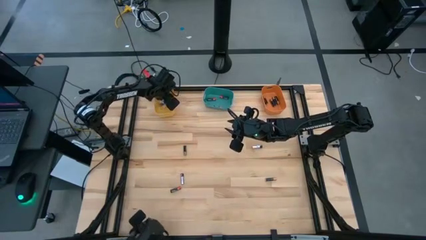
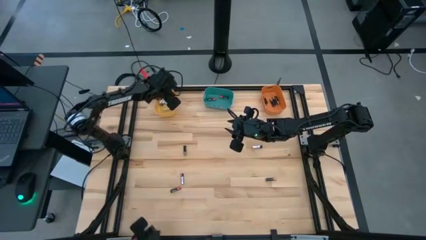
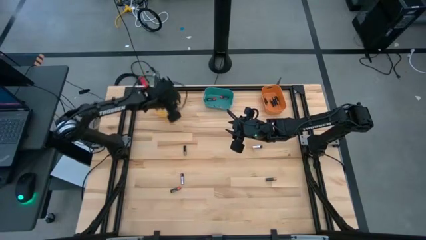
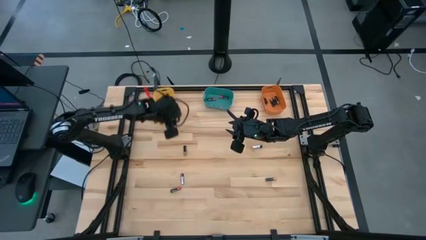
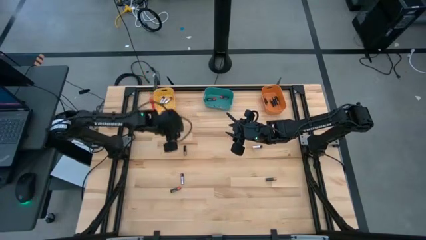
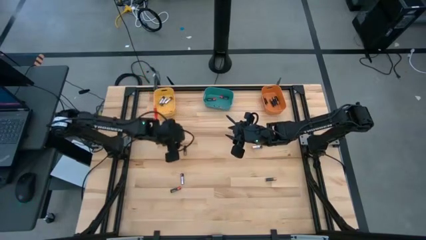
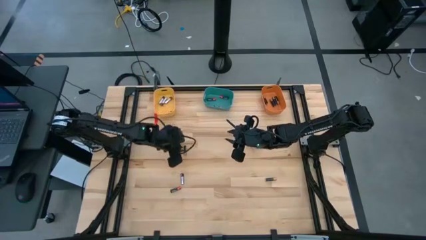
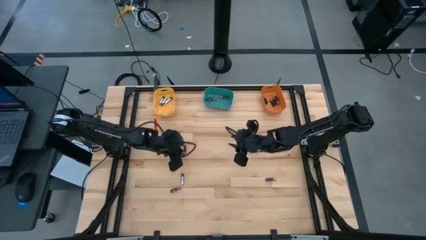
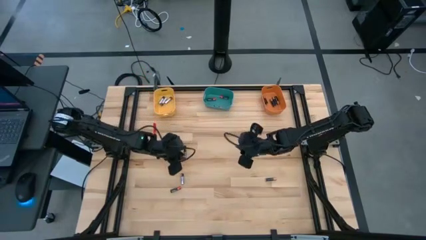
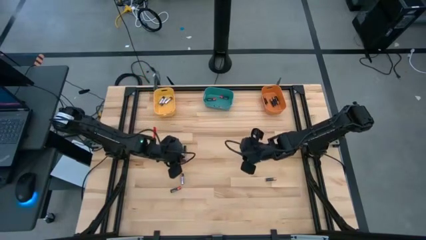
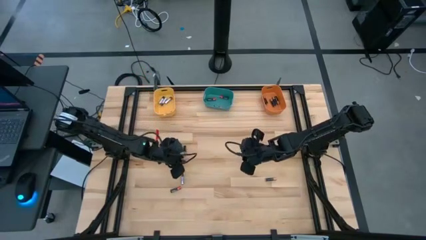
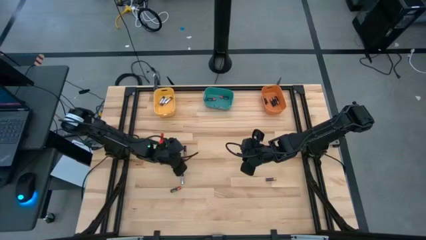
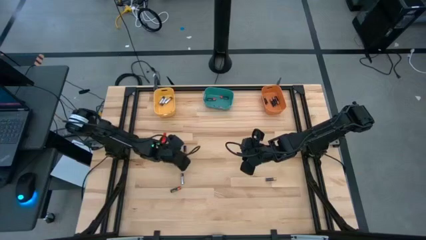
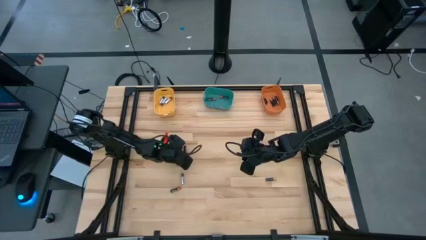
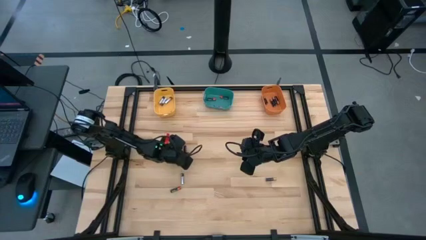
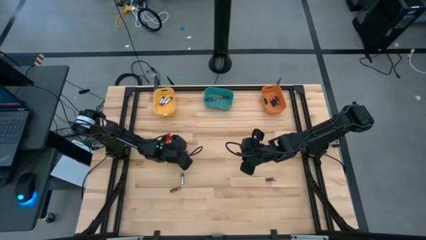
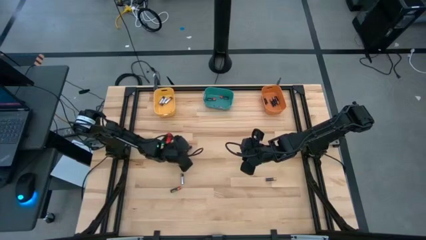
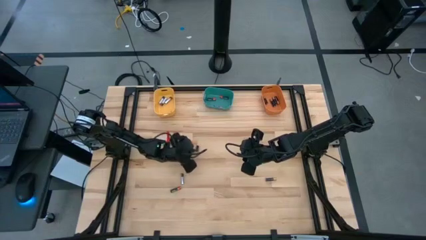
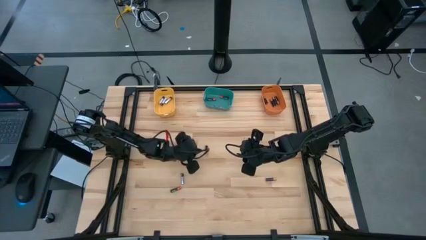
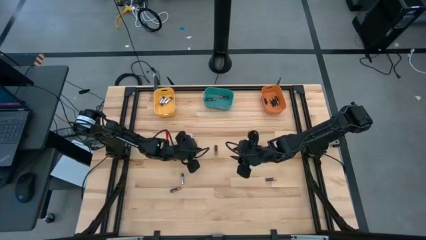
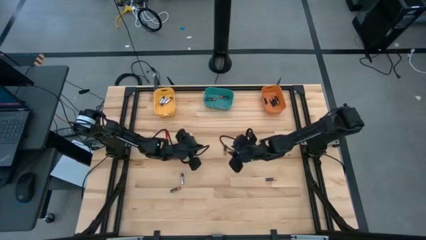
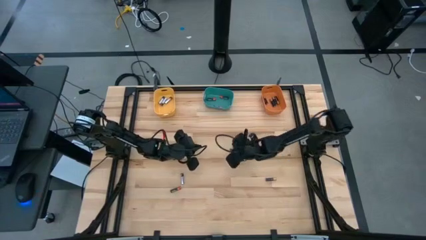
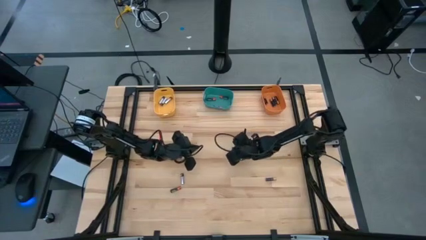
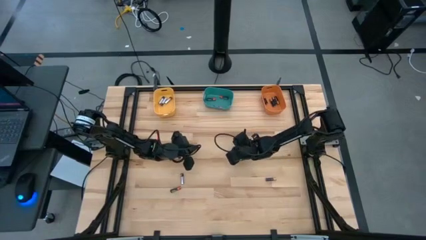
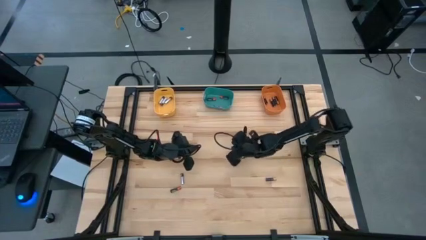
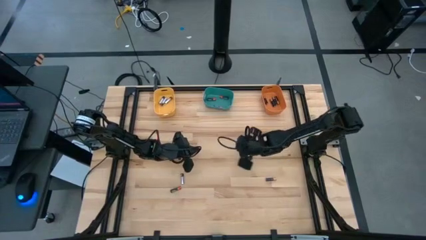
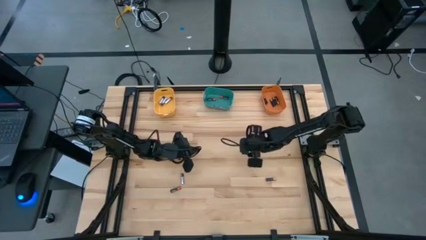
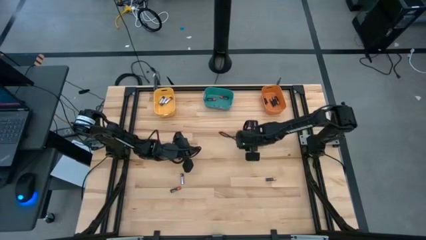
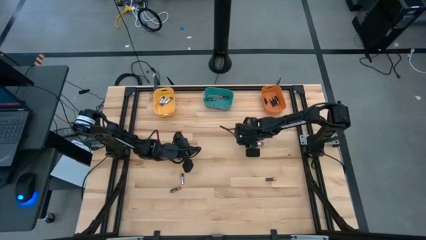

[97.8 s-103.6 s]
Task: Sort batteries
Put the brown battery into the orange bin

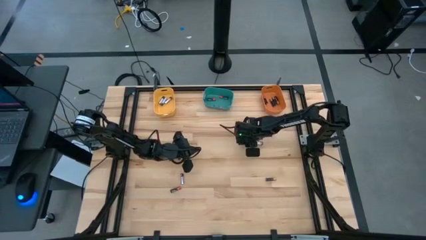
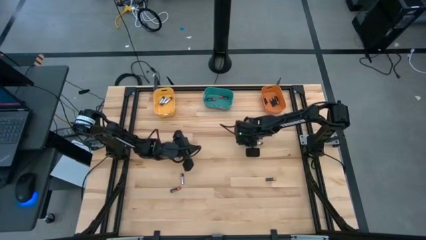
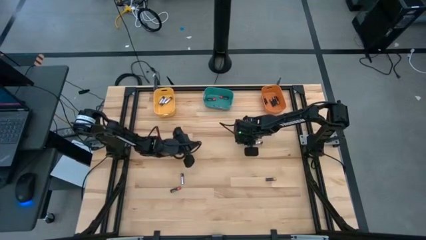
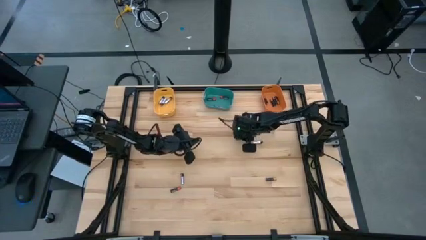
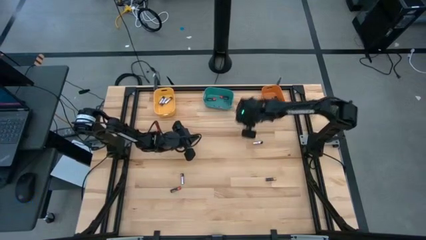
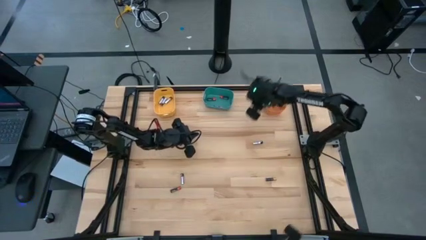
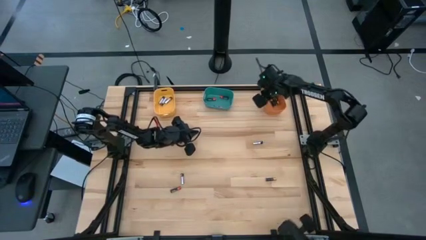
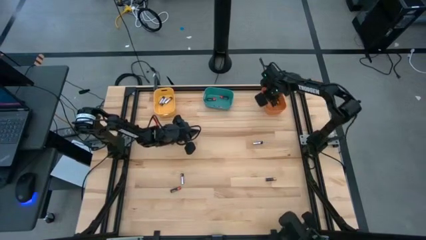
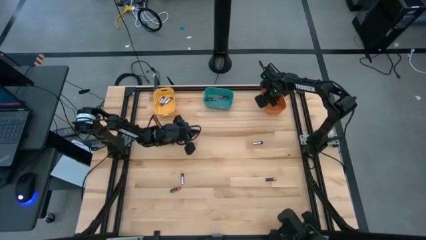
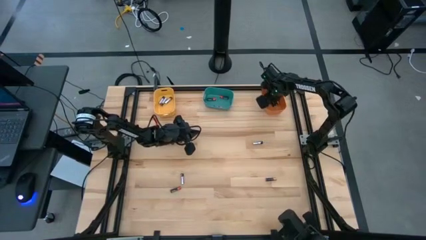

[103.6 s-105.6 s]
Put the brown battery into the orange bin

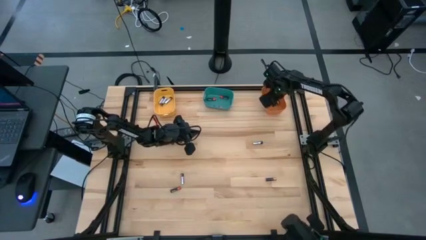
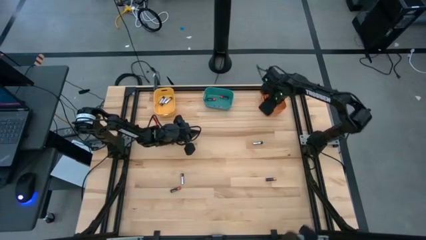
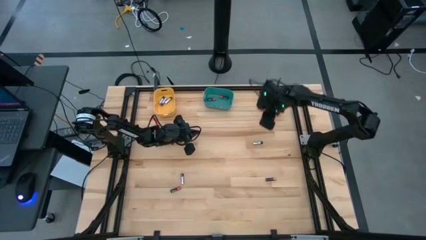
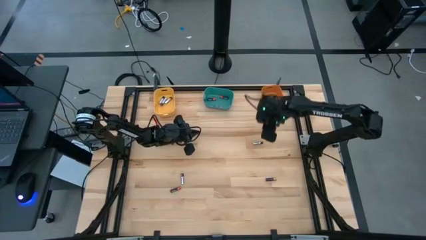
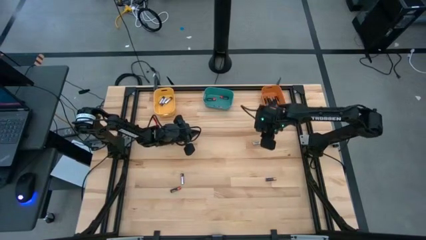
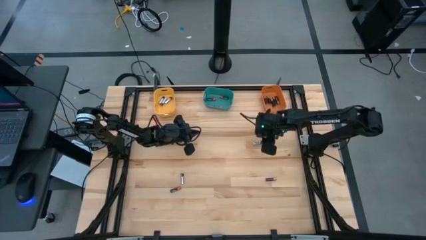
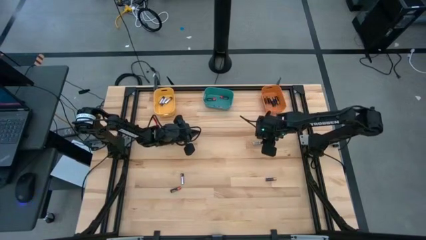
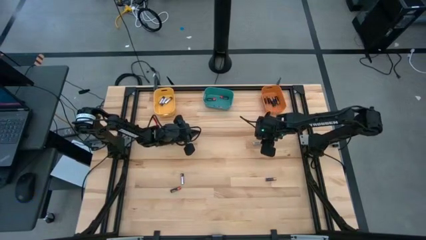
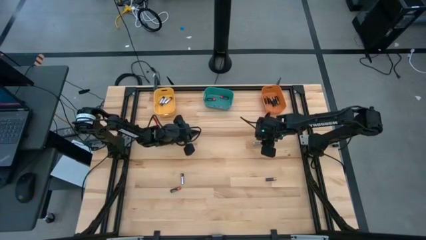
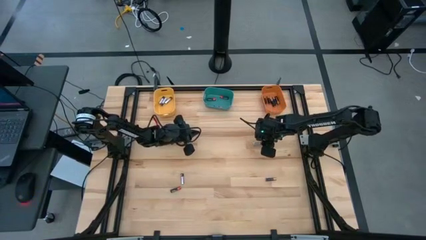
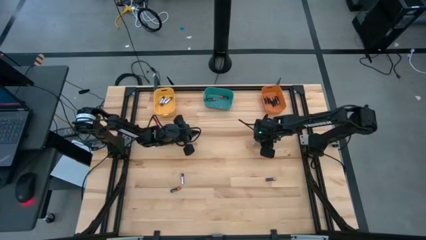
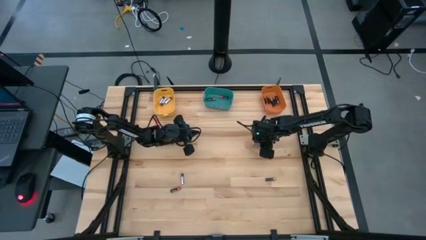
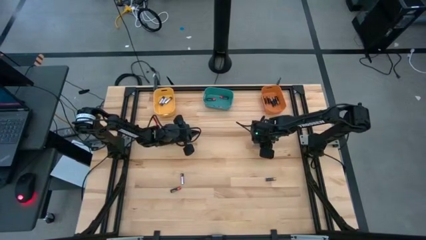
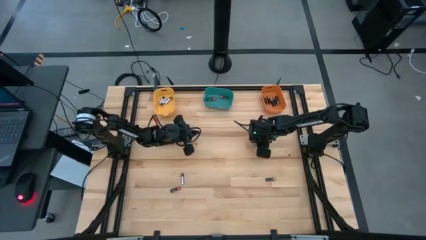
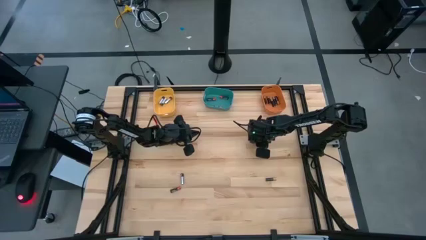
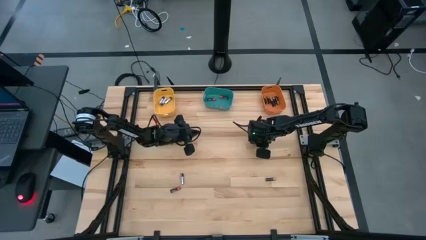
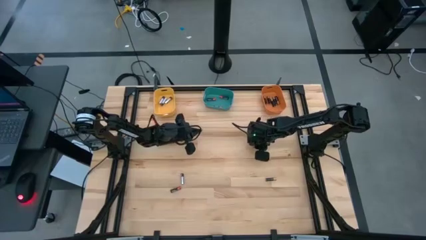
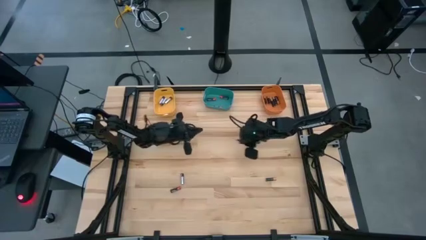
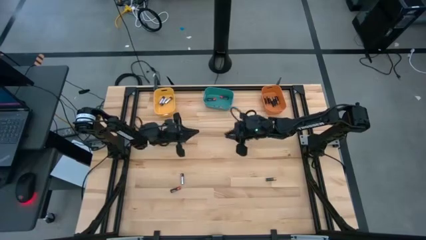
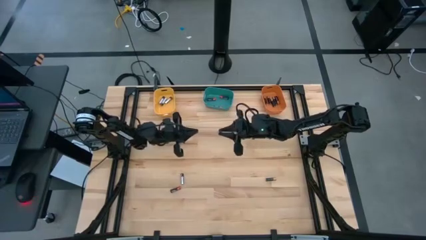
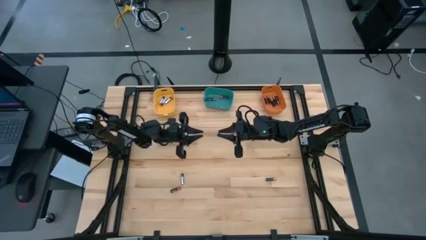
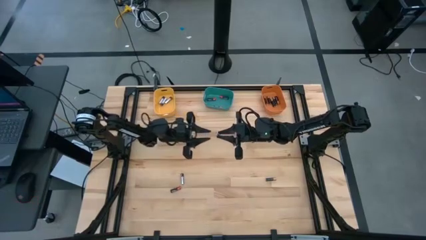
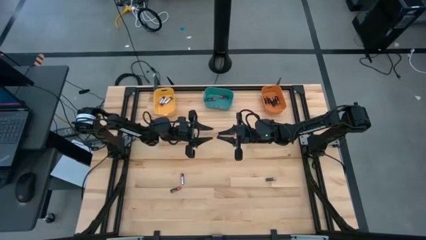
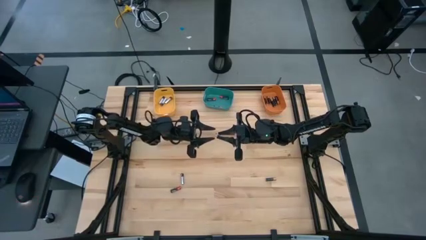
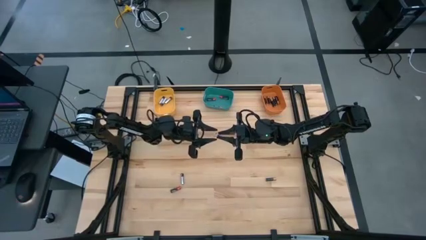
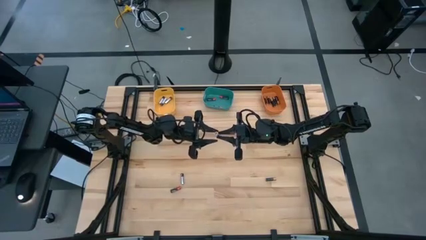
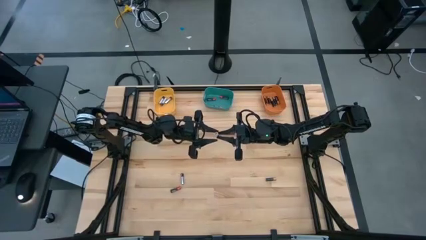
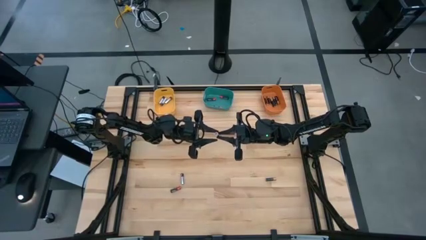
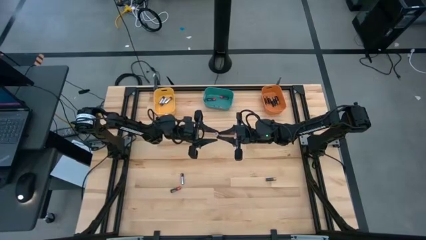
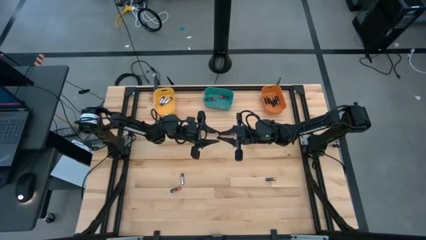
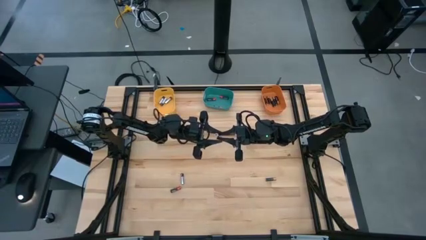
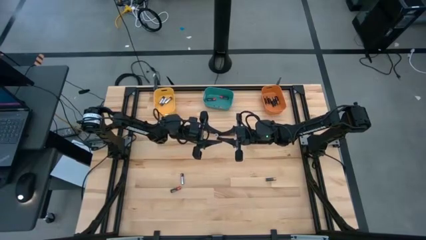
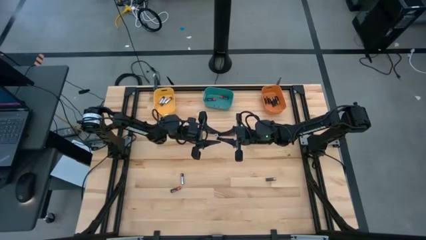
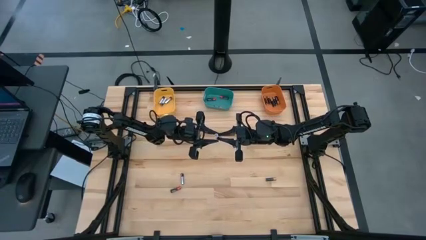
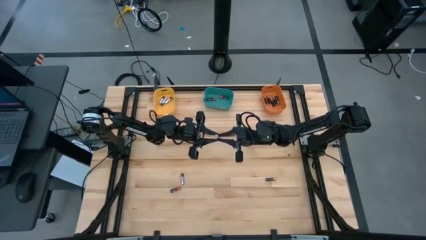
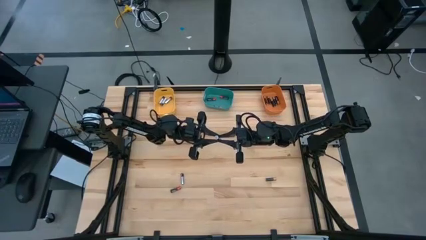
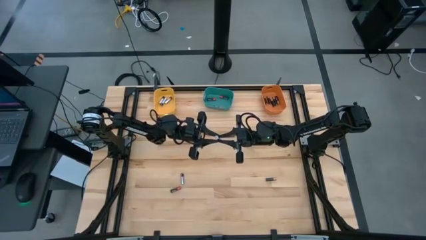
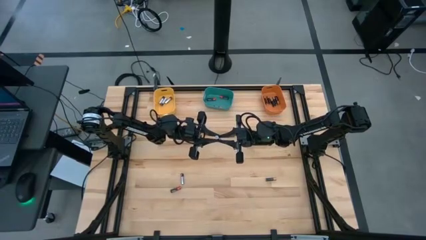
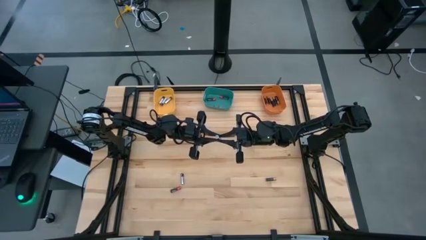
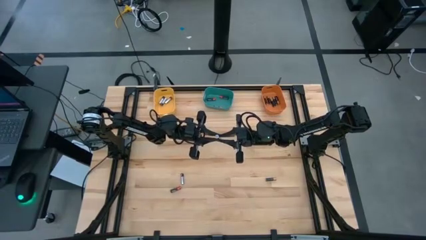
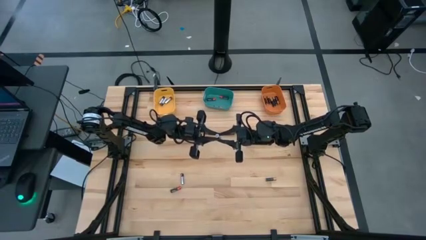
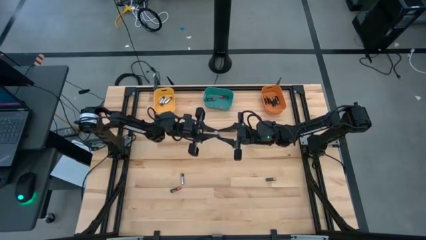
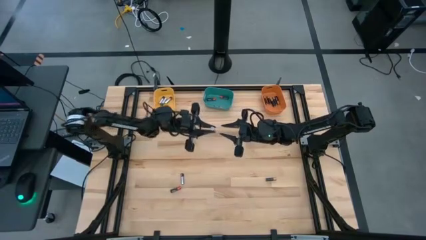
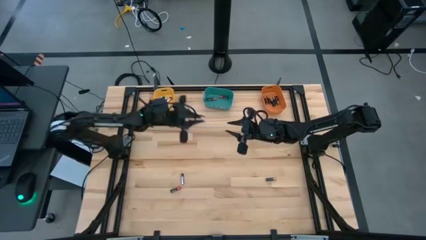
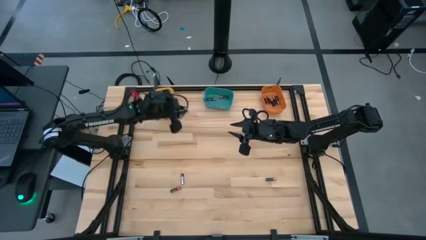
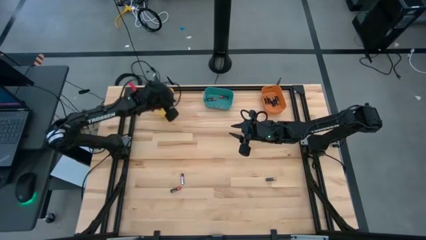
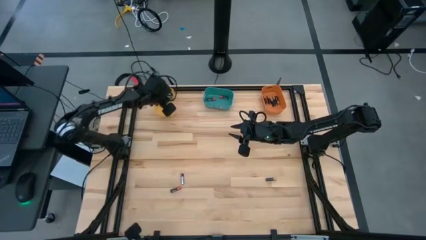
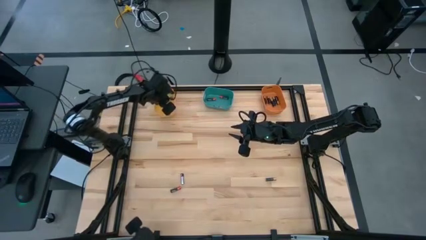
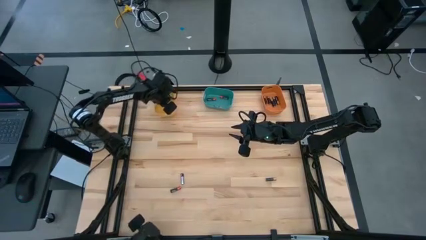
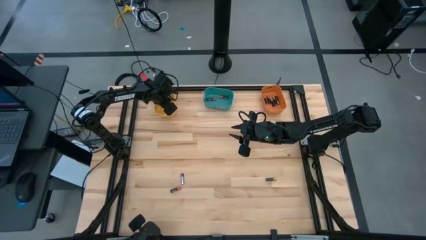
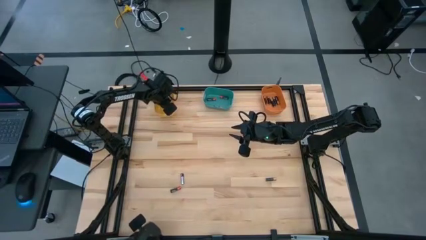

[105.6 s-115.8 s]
Put the silver battery into the yellow bin
